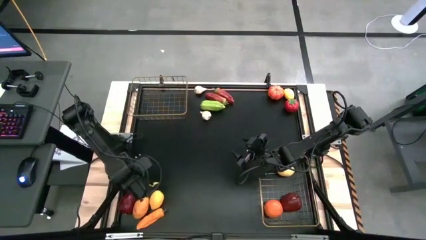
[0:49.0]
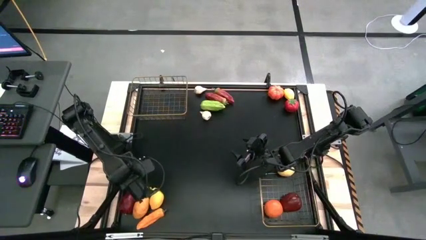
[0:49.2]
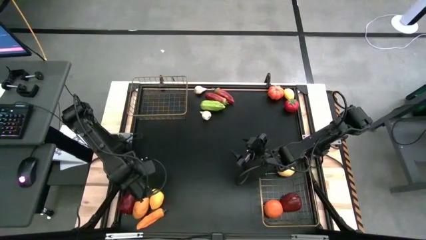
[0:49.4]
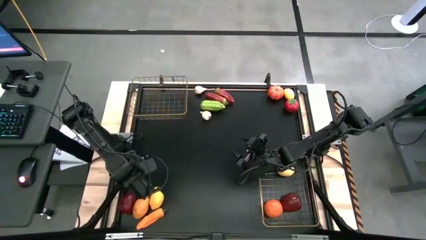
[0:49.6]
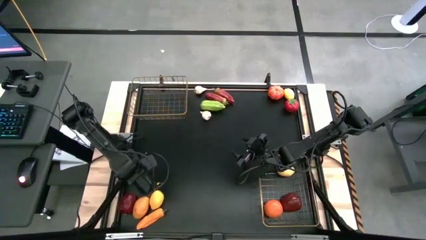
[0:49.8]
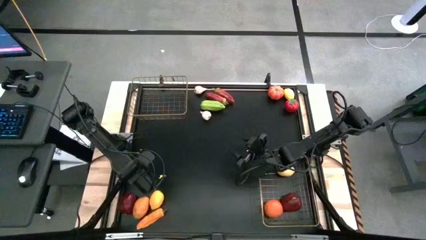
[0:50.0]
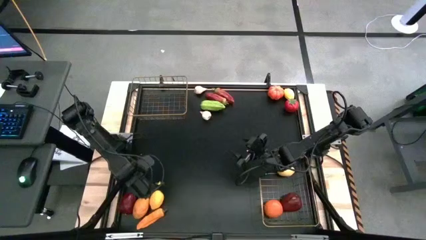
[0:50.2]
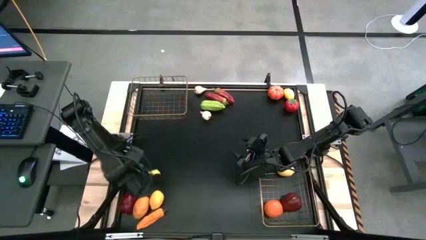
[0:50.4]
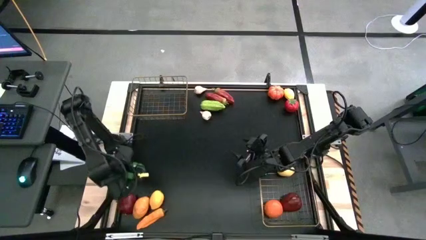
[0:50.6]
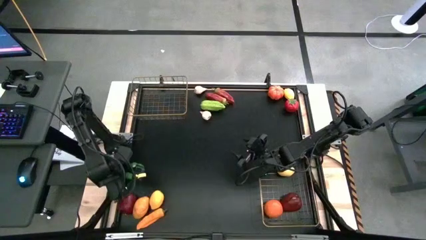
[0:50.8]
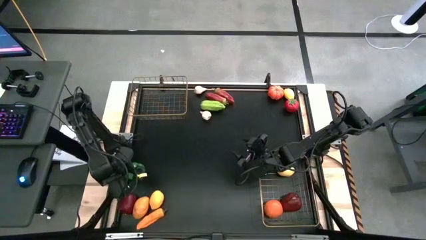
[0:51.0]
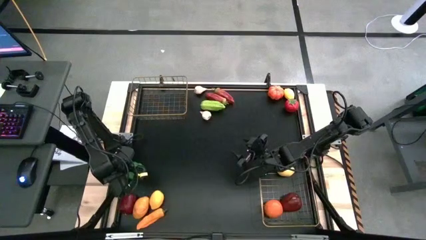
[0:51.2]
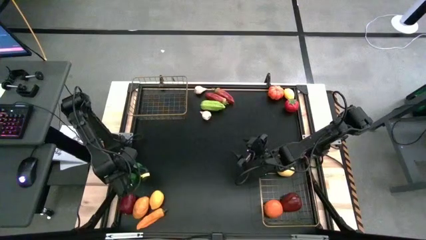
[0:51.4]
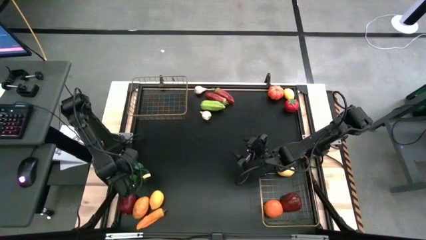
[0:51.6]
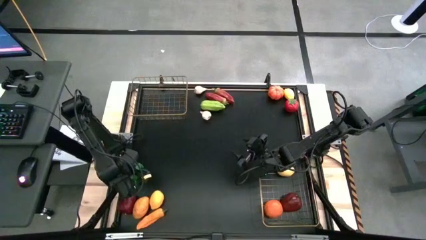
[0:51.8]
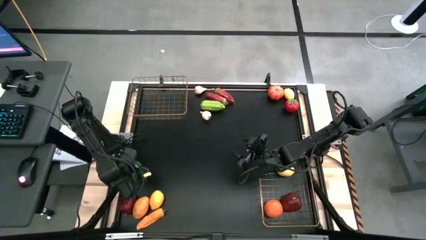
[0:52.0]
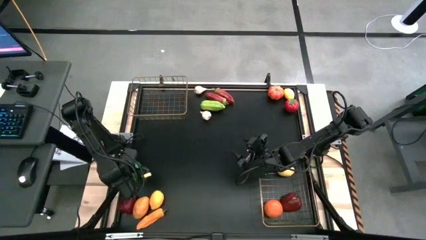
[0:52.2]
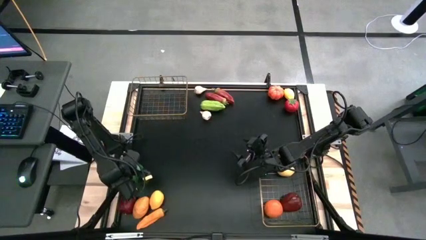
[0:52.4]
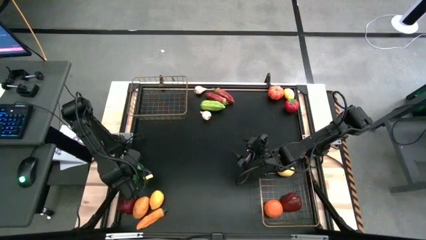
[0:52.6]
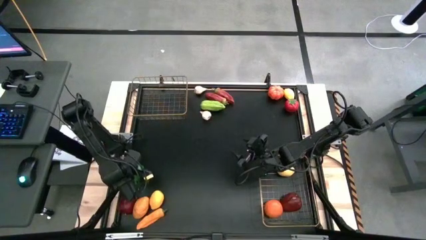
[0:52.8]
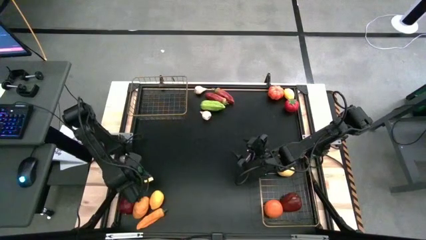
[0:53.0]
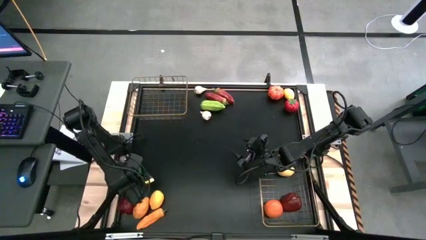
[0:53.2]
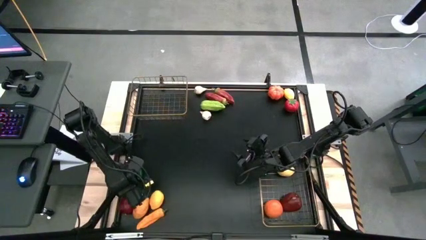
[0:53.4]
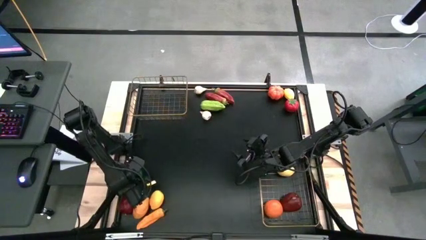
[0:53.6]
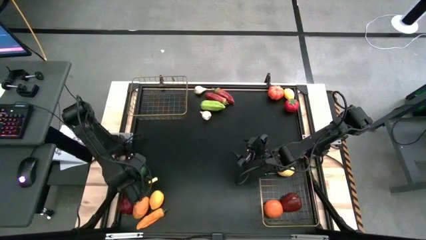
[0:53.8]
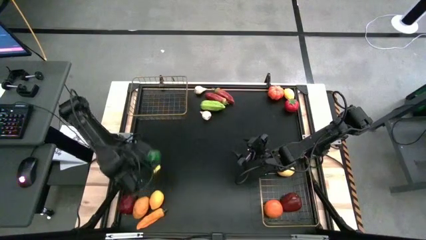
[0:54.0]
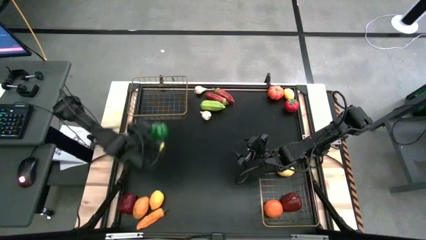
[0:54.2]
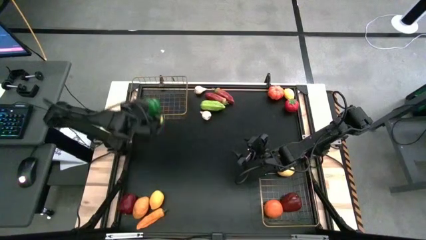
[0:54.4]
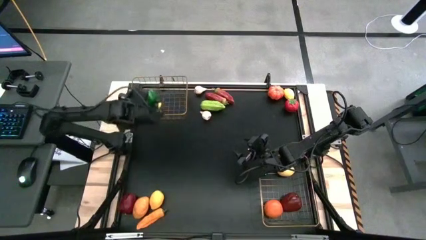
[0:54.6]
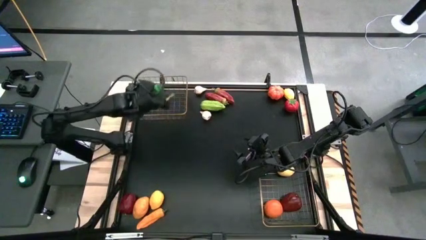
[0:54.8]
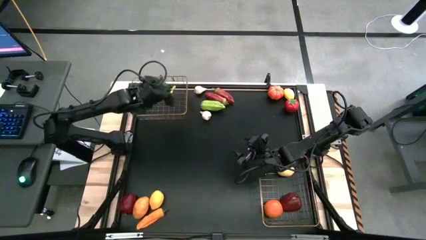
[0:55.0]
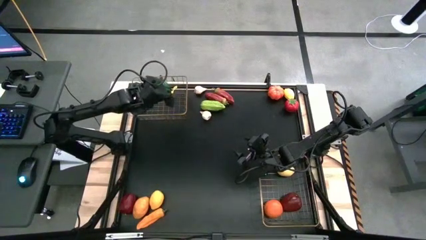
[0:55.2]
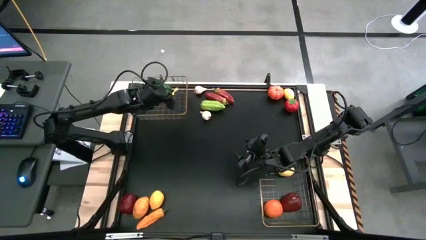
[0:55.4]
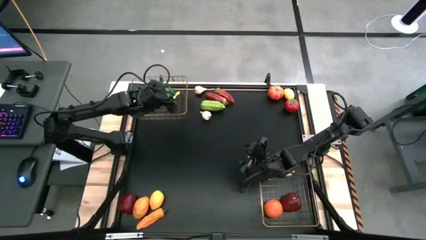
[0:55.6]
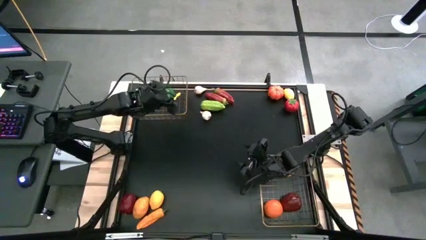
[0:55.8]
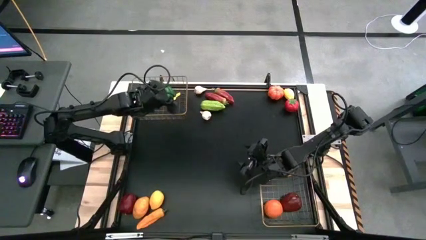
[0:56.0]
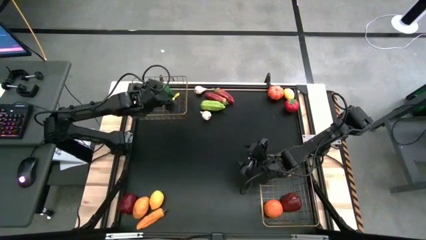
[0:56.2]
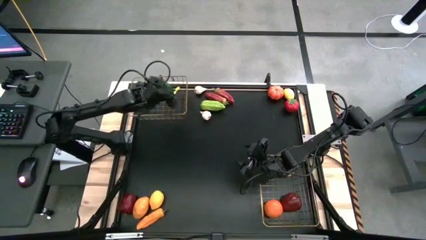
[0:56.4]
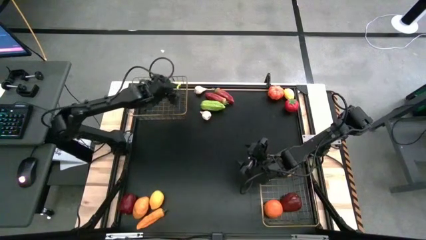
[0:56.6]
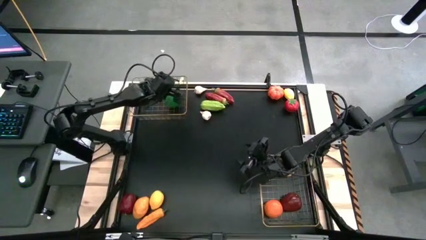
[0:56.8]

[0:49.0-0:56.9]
Task: Sort produce into baskets
Put the green bell pepper into the top wire basket

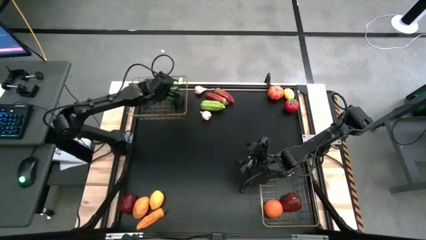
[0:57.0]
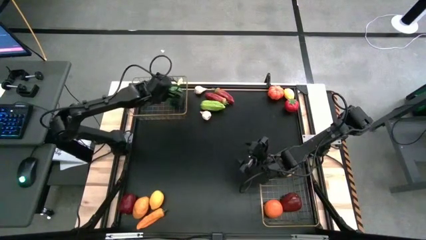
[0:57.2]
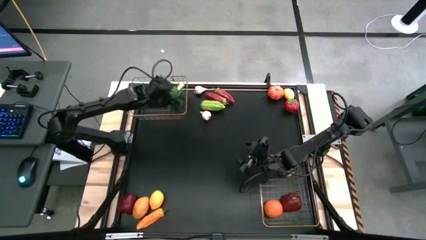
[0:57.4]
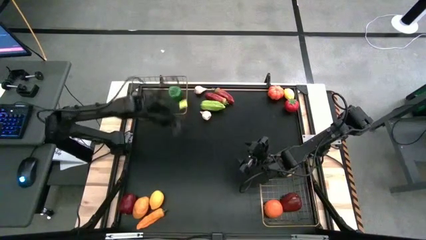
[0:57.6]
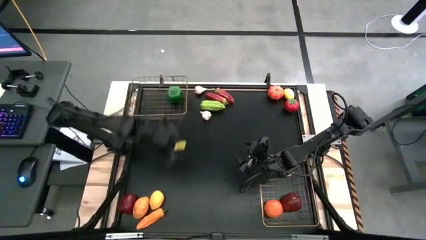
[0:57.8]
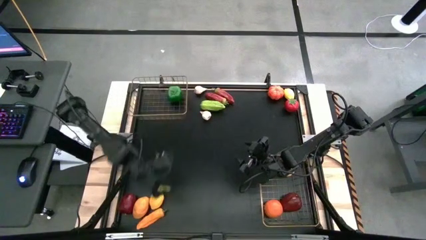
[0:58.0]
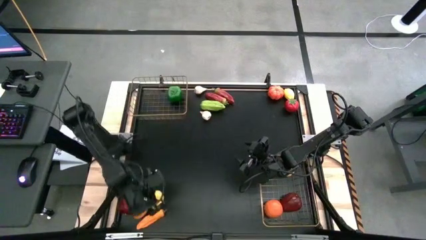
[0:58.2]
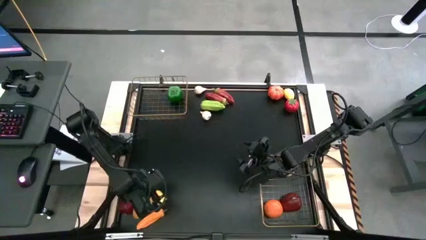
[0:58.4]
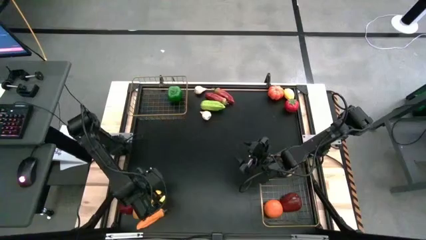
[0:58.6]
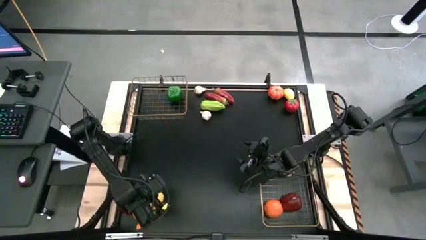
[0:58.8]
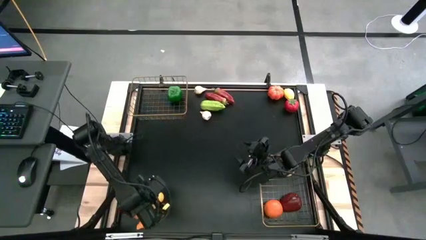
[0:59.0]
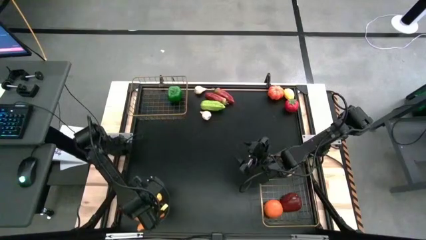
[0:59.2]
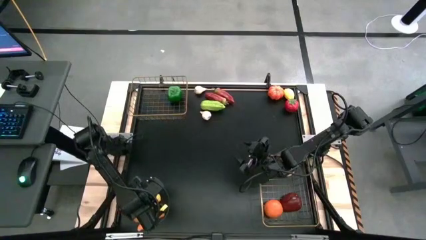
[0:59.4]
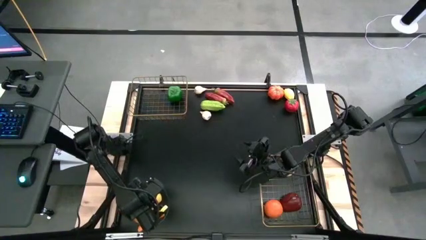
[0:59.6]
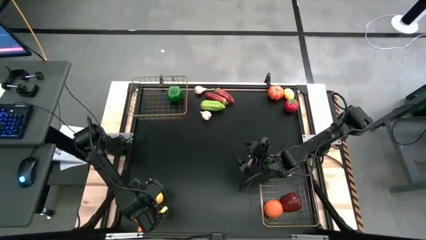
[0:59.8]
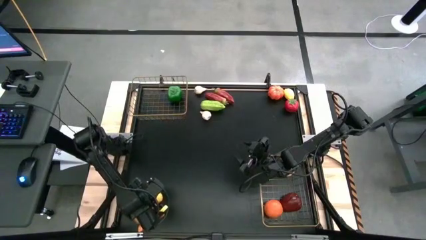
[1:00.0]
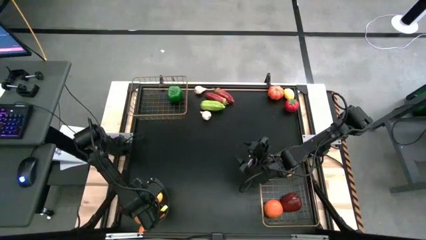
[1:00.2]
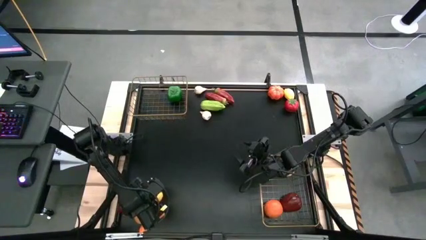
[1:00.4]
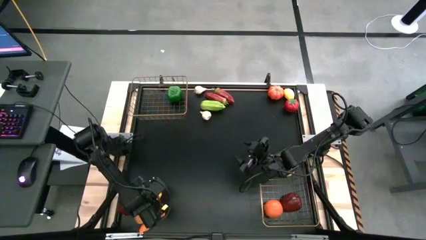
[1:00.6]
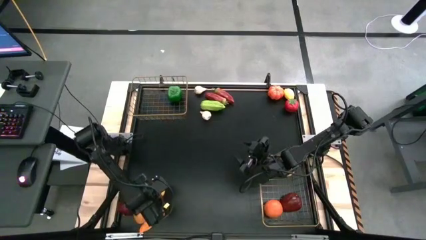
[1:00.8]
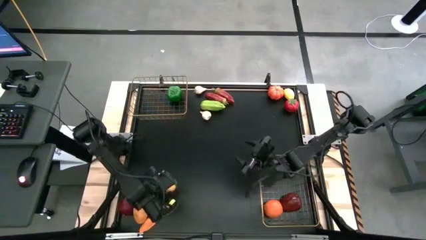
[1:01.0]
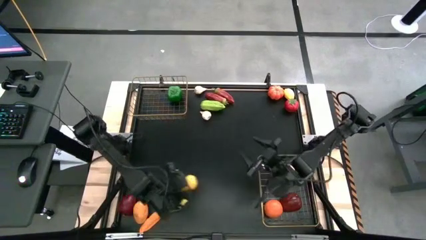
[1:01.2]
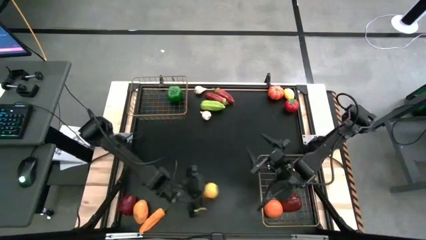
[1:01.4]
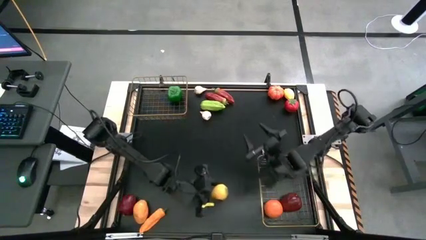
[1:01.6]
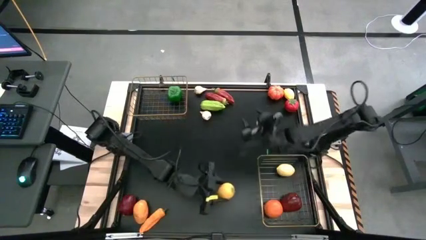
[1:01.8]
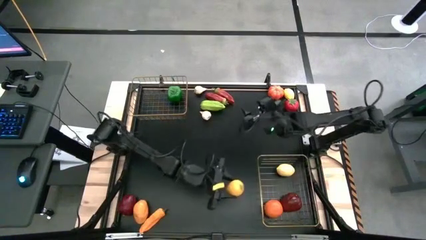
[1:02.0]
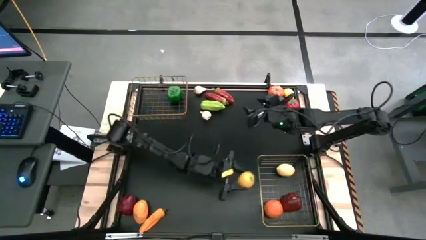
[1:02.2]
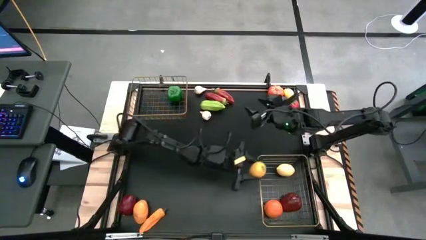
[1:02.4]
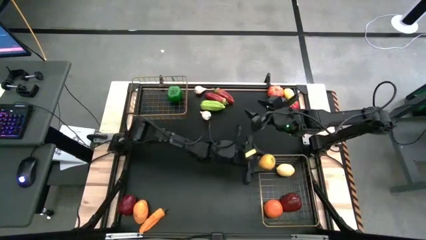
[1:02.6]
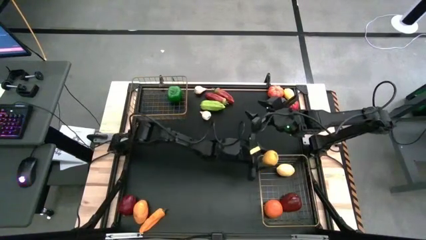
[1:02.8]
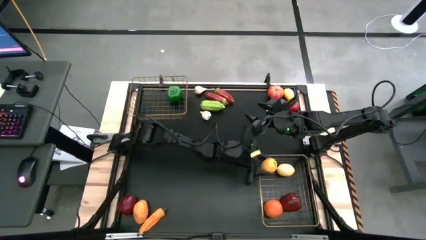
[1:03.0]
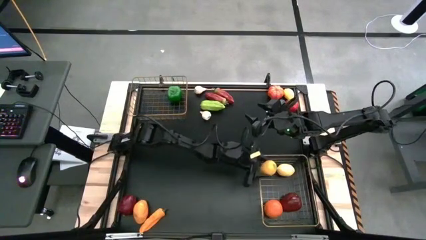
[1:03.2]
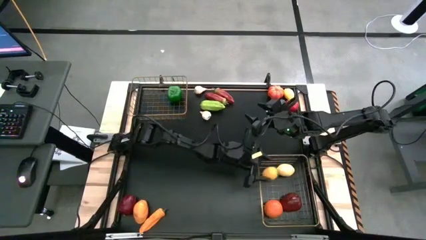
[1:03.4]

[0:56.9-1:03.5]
Put the bottom yellow lemon into the bottom wire basket

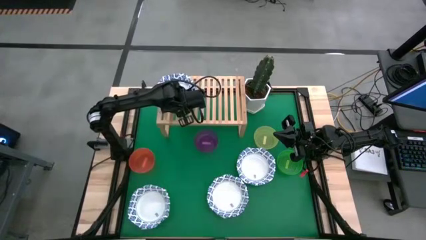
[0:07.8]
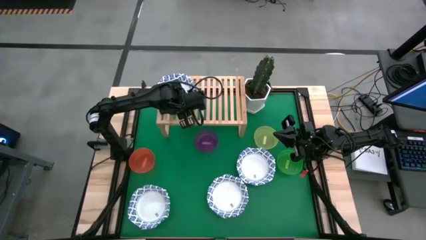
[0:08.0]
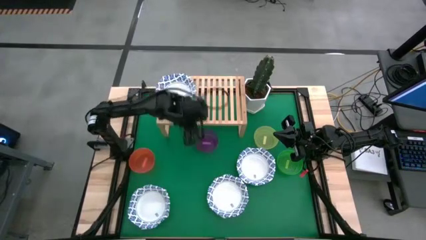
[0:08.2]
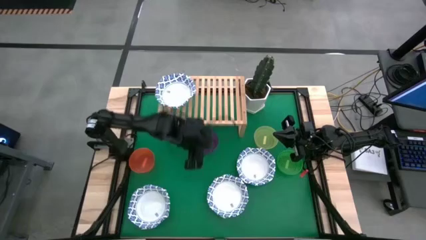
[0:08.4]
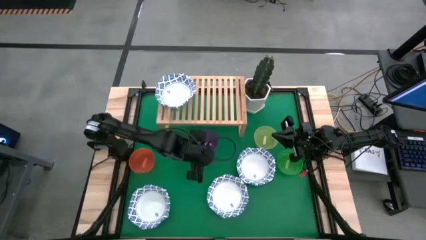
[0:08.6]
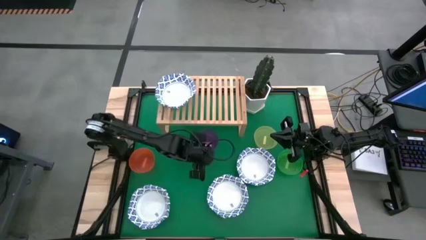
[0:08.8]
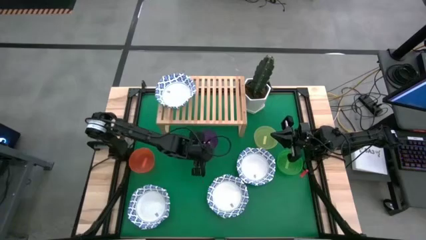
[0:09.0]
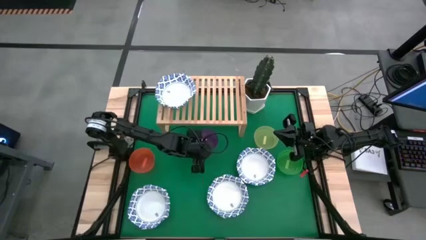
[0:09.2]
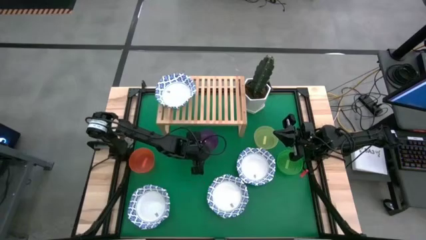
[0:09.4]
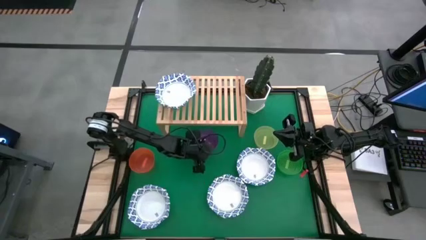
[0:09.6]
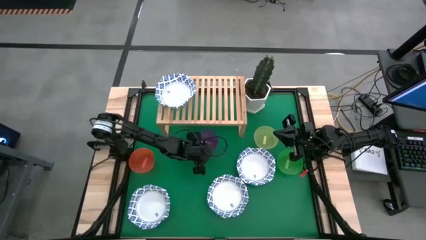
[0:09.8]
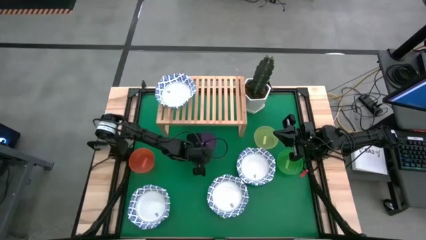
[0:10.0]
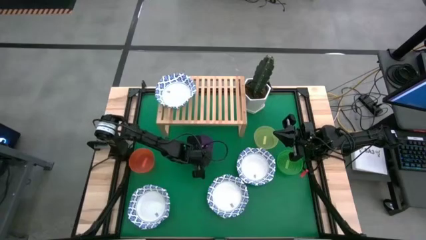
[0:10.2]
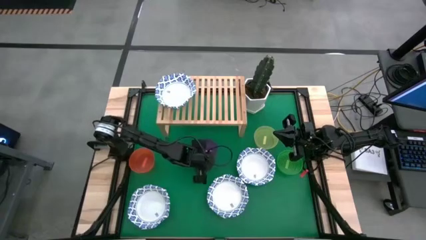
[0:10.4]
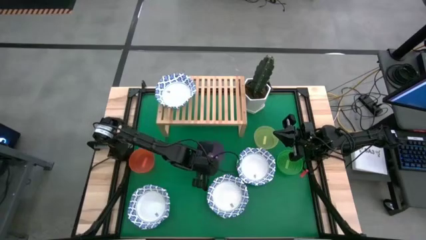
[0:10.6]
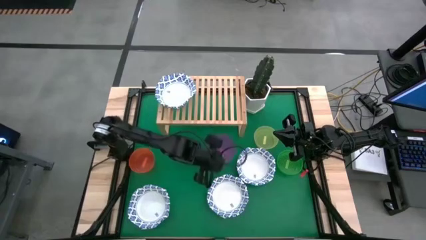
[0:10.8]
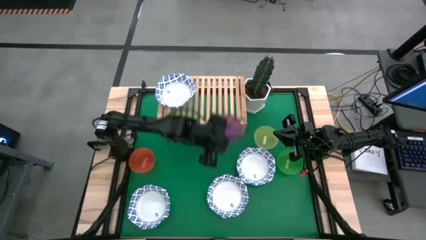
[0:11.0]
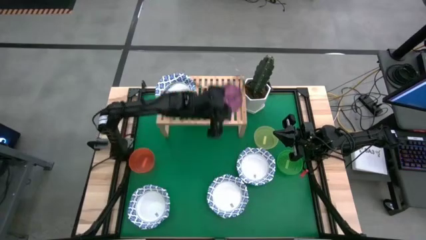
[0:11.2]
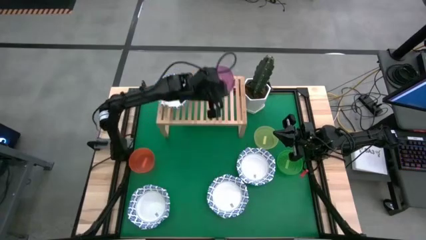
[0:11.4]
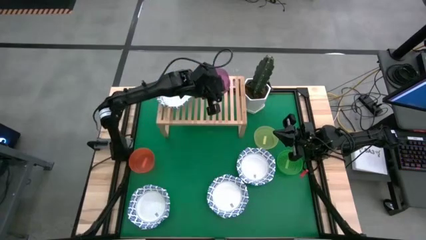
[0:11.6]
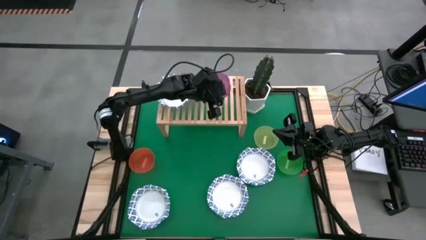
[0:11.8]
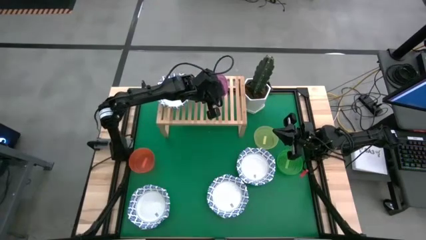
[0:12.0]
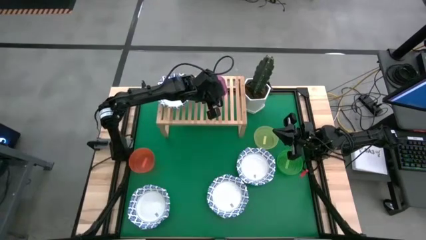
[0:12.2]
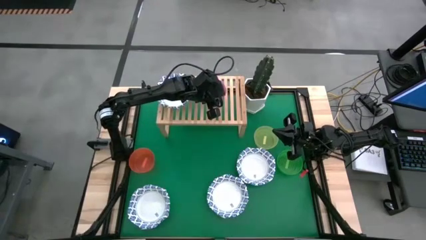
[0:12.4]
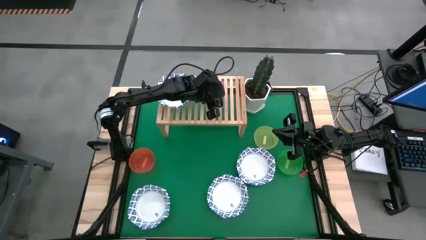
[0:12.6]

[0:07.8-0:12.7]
Task: Place and stack bowls onto a shelf
Put the violet bowl on the shelf
